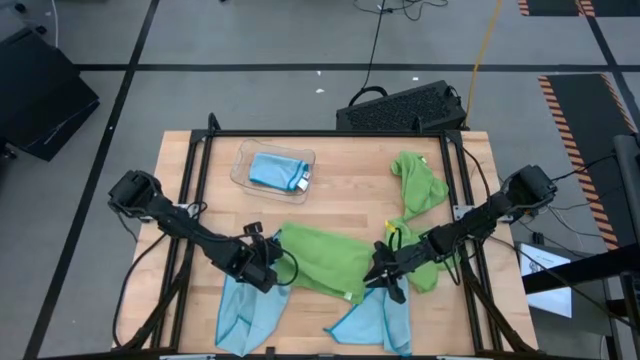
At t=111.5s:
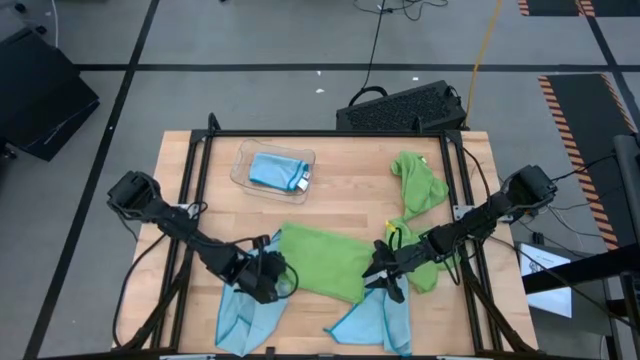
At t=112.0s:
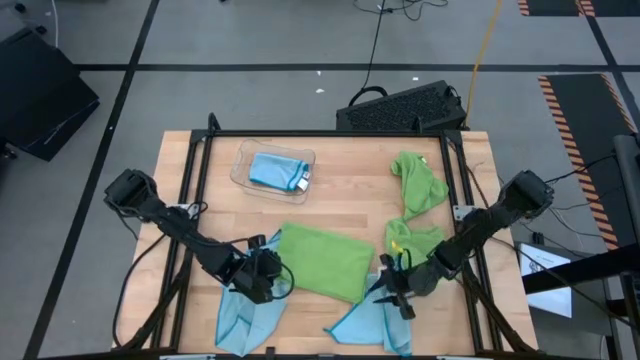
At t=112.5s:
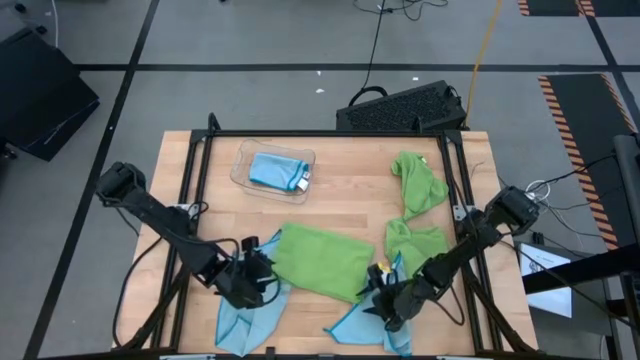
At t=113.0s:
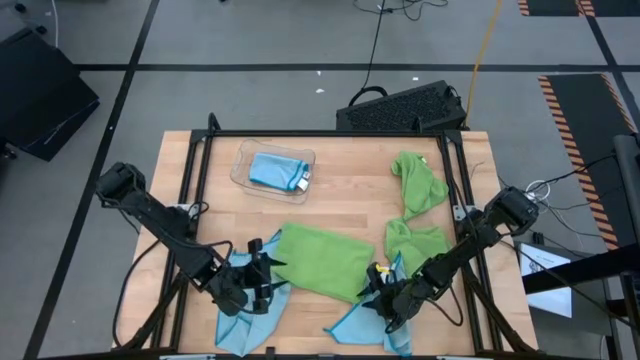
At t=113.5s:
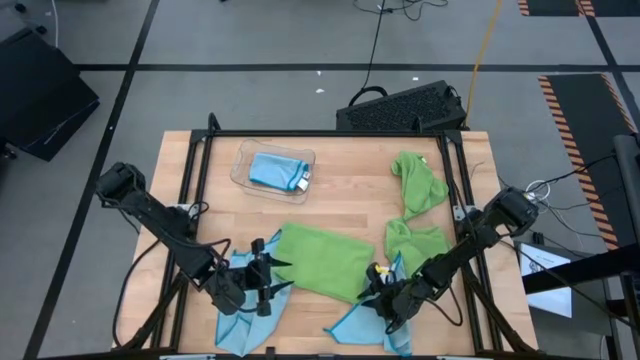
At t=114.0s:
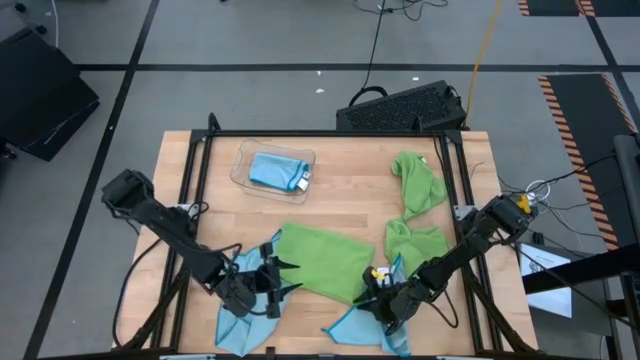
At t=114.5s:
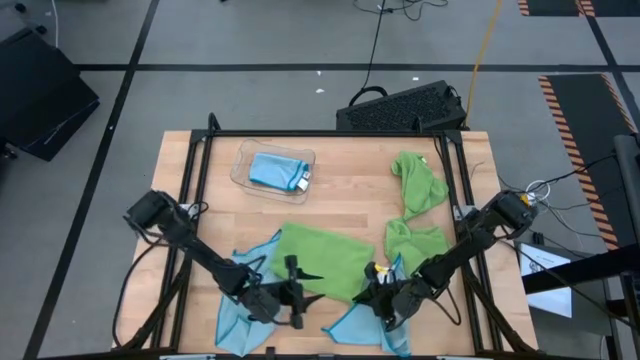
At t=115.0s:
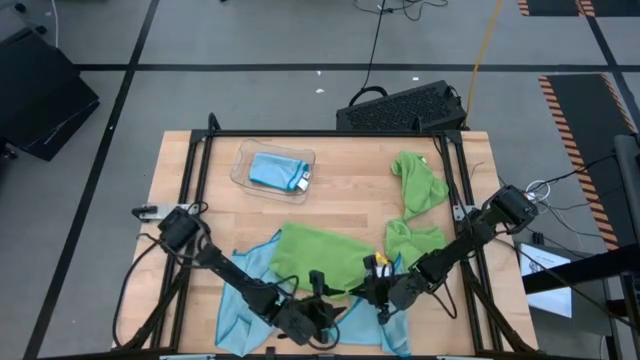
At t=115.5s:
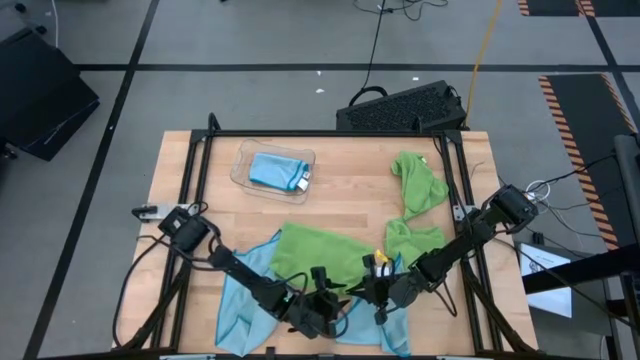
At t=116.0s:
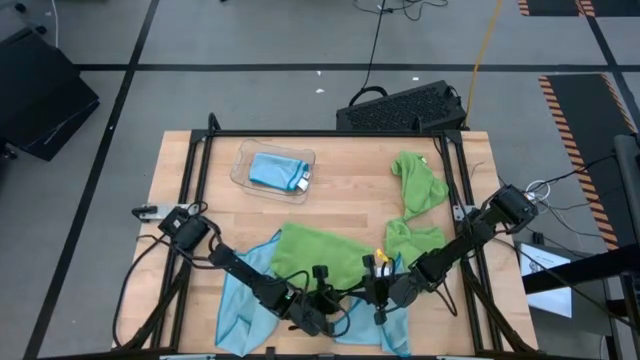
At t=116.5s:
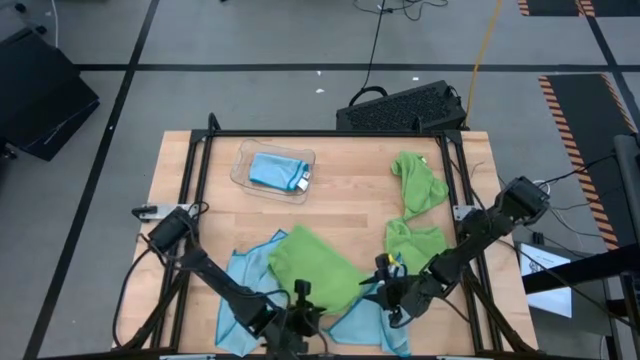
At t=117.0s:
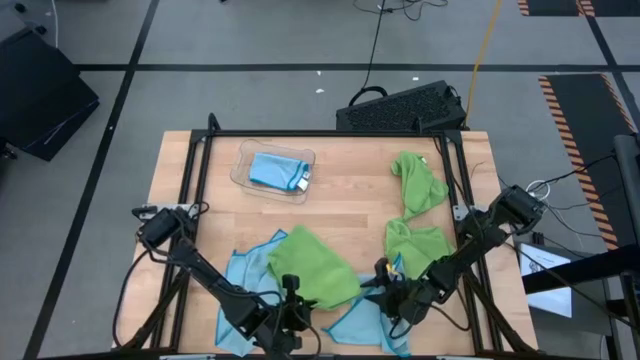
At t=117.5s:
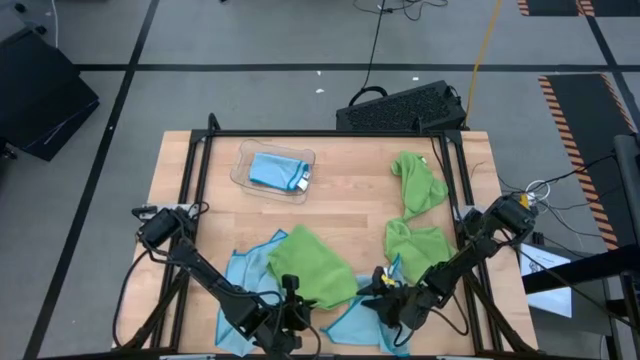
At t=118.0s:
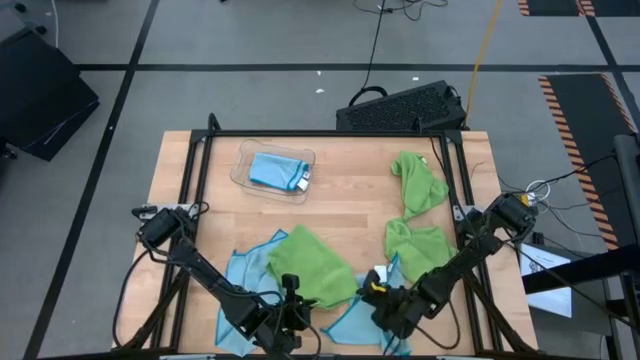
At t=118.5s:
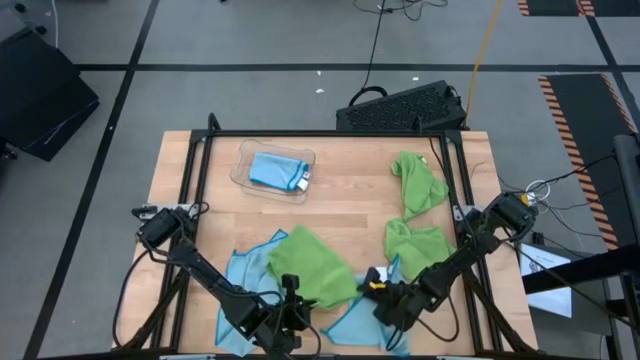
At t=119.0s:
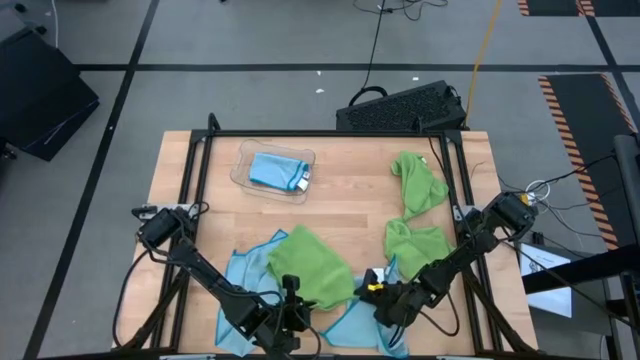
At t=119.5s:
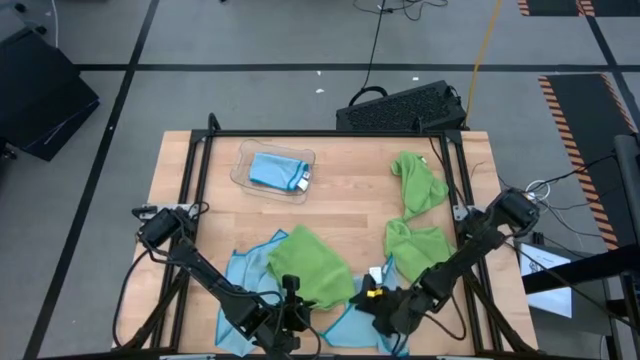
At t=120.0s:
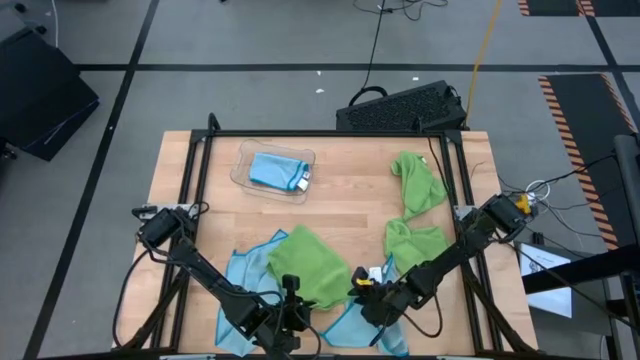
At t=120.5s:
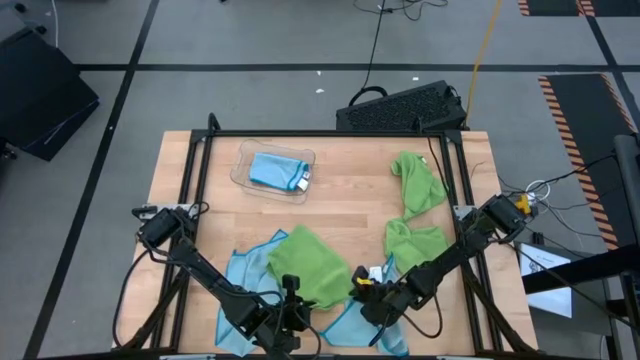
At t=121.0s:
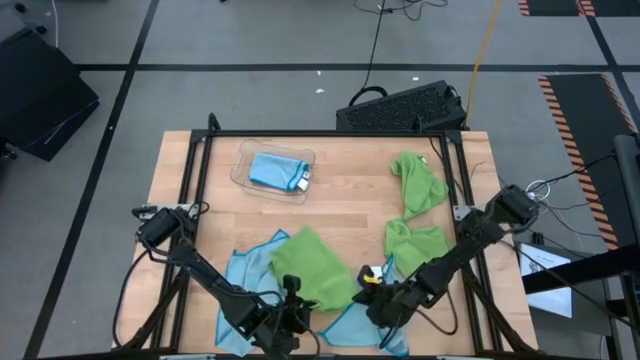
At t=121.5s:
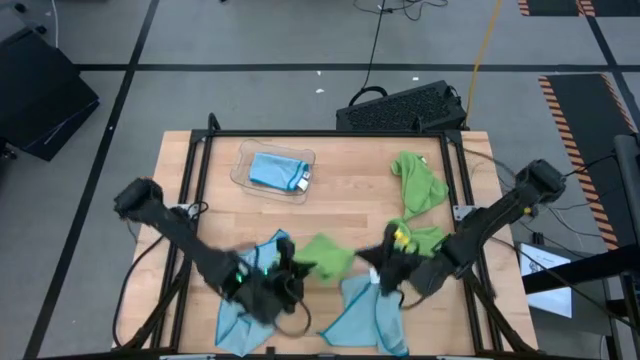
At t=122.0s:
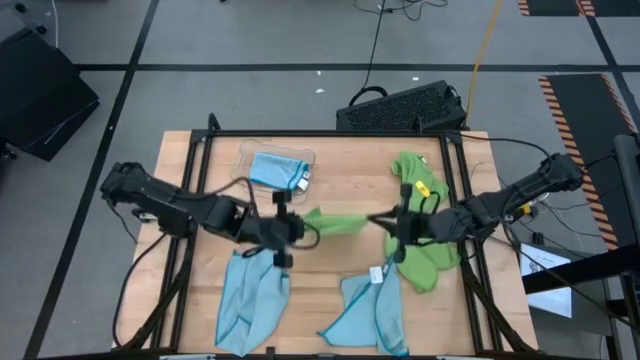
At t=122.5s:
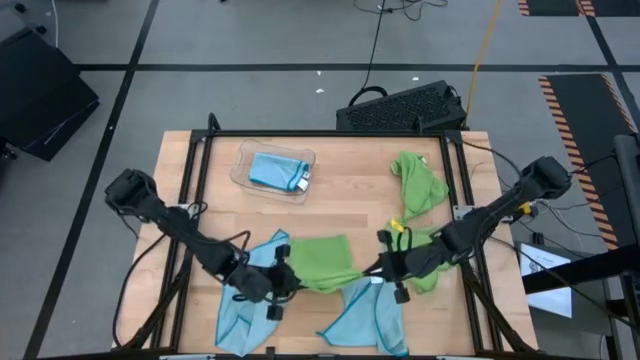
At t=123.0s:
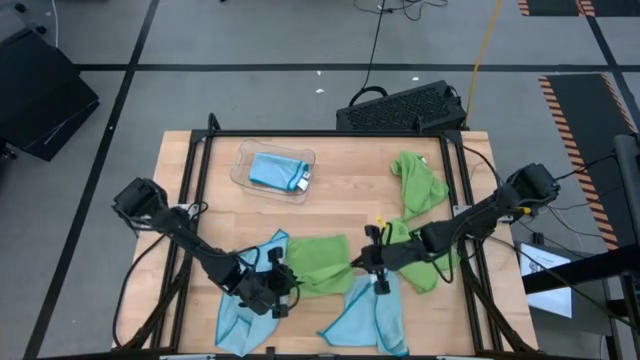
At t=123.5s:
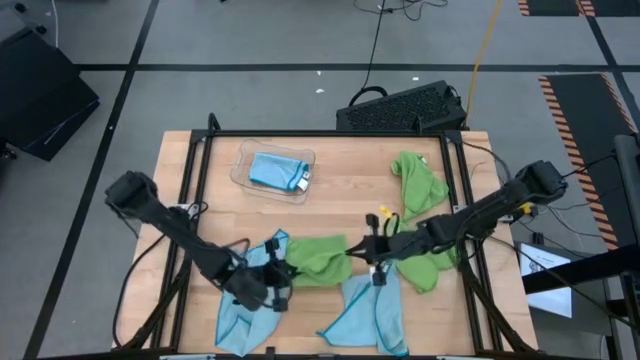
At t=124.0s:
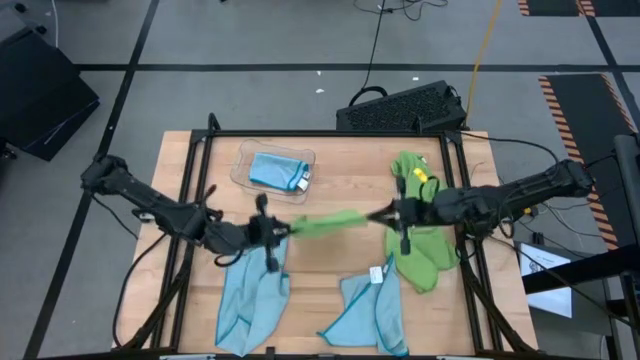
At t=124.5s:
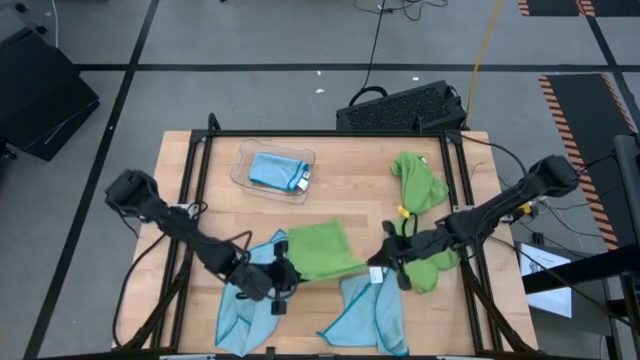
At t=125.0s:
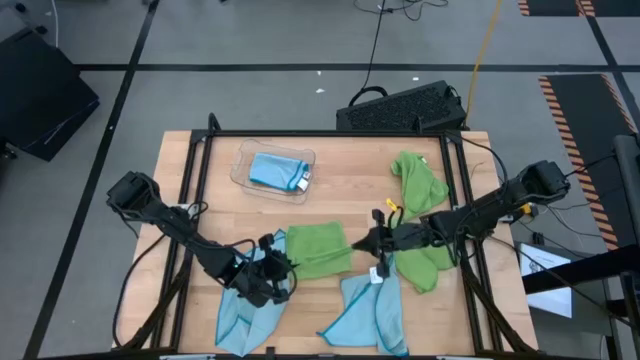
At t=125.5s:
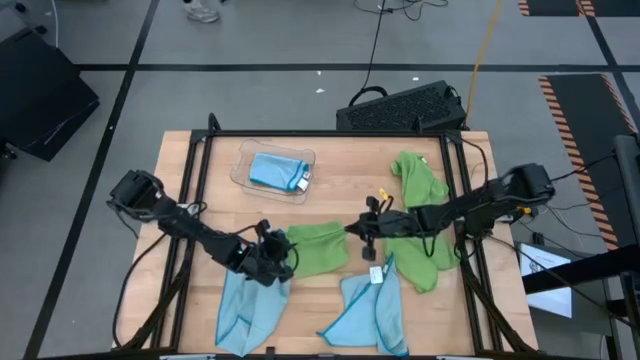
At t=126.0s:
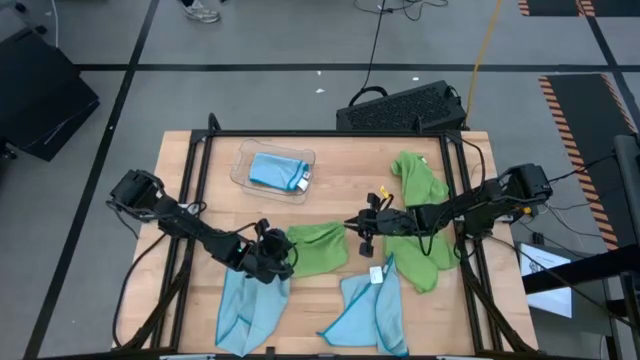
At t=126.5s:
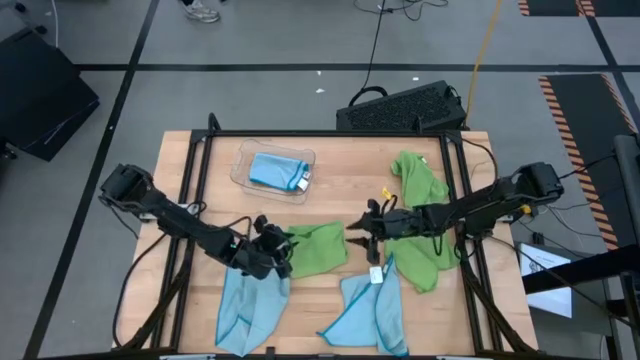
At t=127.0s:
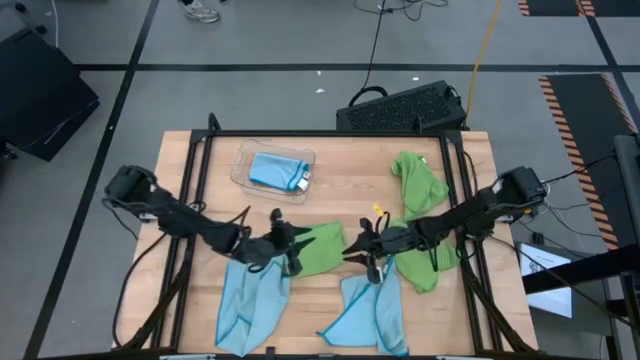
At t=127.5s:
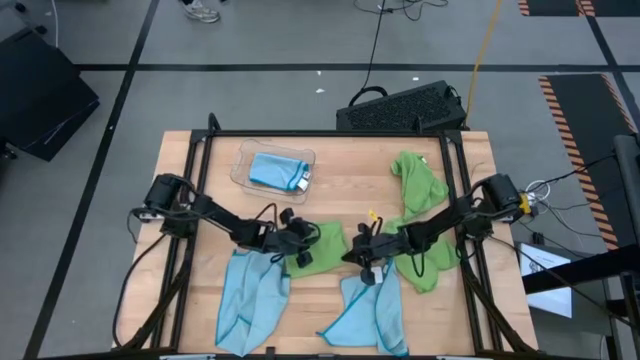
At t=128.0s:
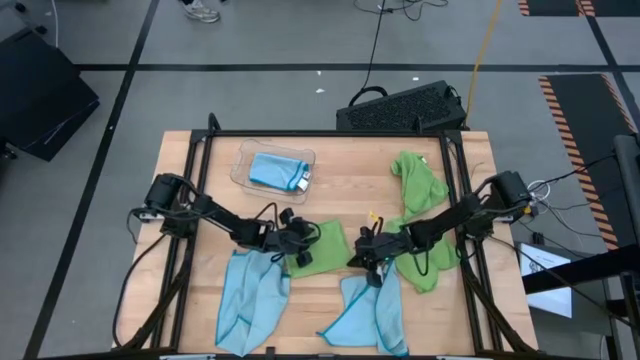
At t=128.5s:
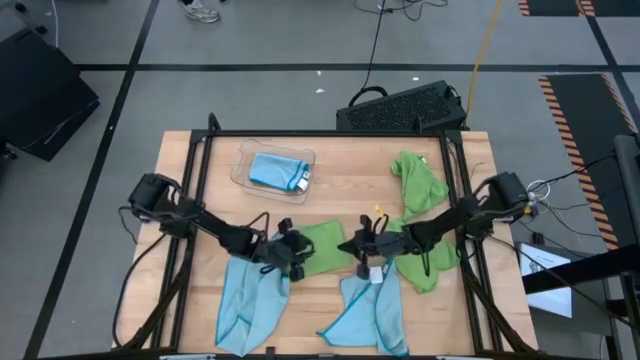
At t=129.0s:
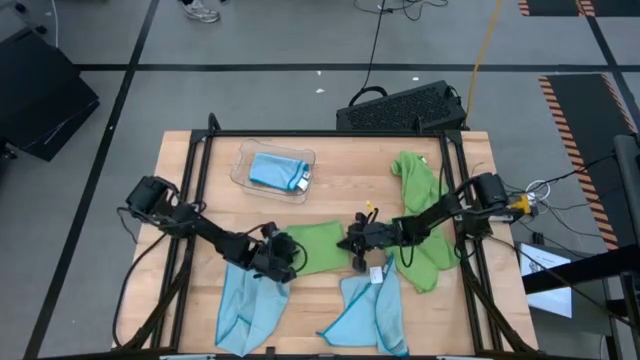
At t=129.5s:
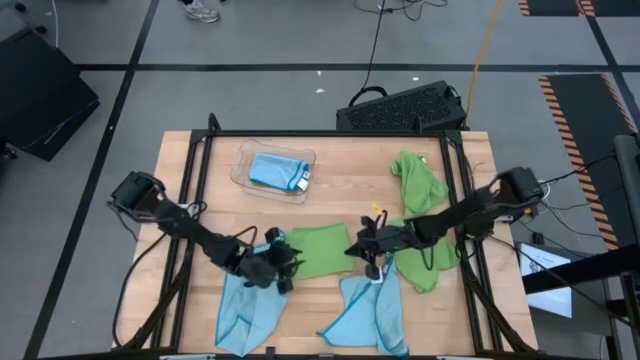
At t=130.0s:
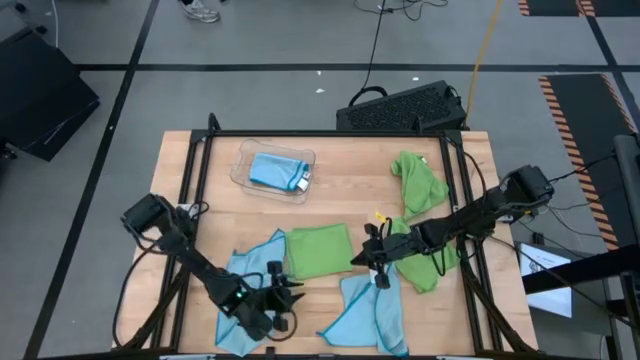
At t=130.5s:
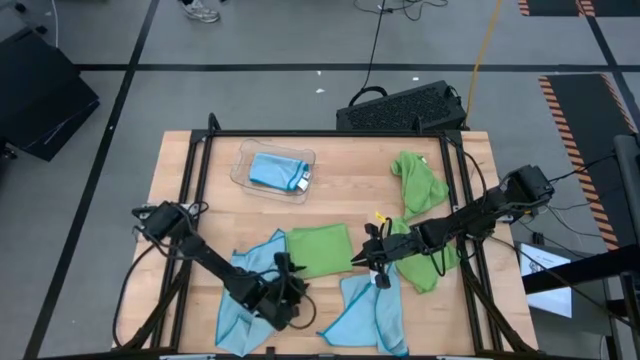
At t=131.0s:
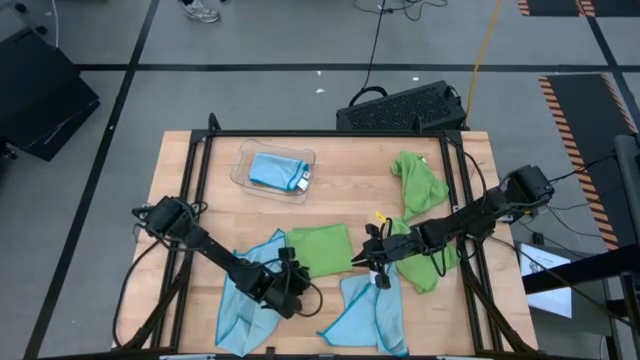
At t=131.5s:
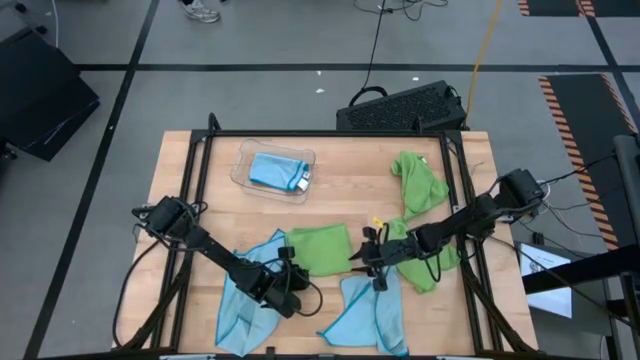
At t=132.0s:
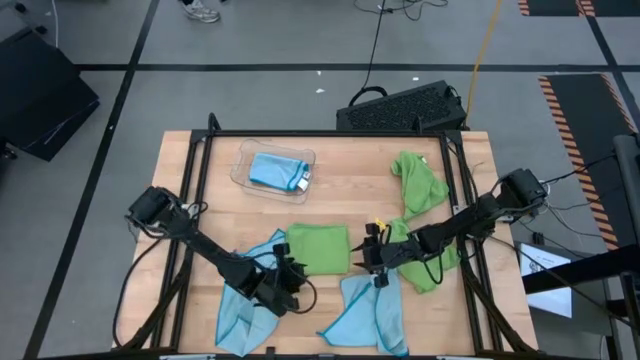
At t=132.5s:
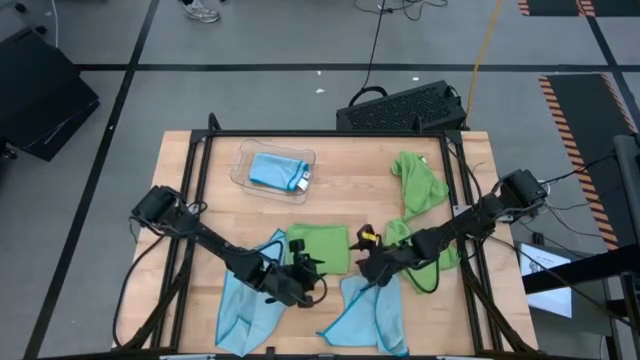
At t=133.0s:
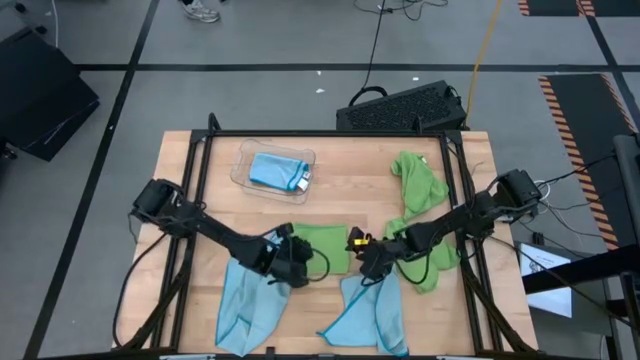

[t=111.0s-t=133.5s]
Task: Fold microfiber towels
Fold the bottom left green microfiber cloth
